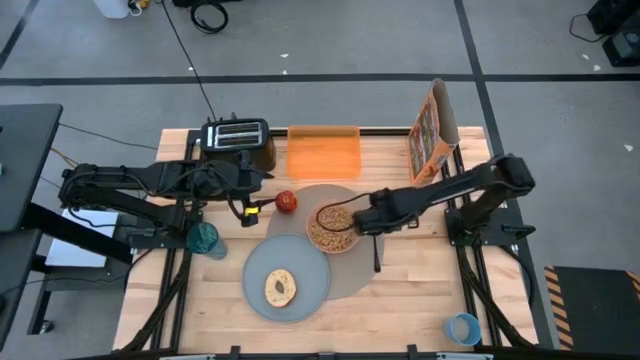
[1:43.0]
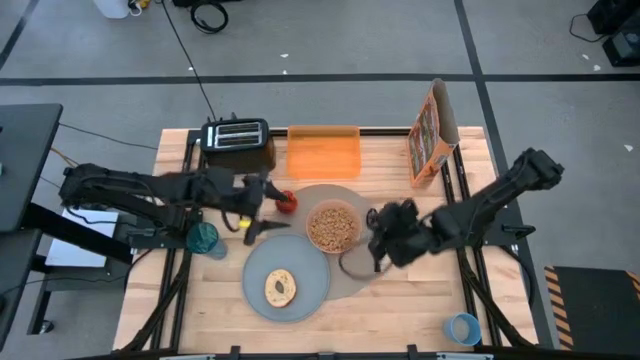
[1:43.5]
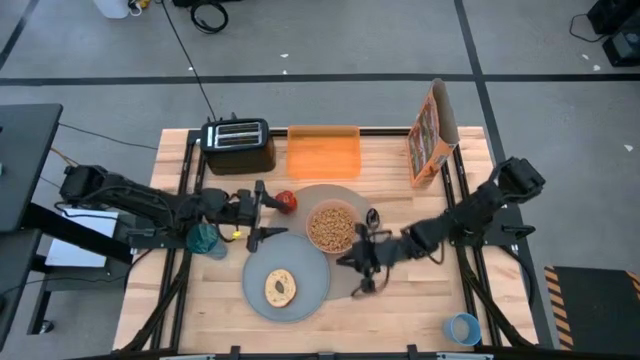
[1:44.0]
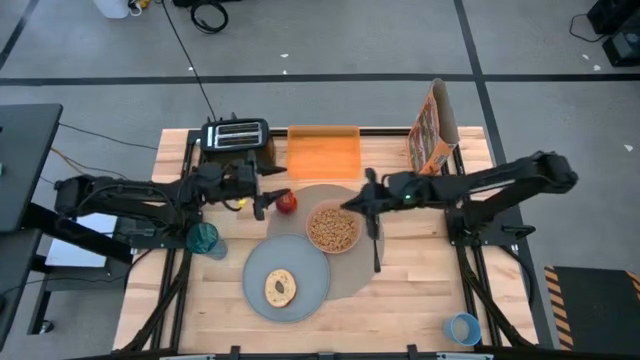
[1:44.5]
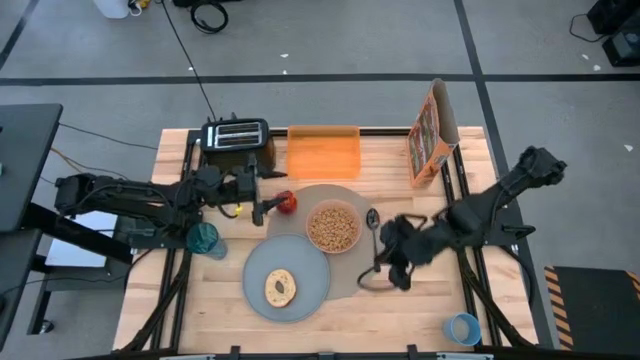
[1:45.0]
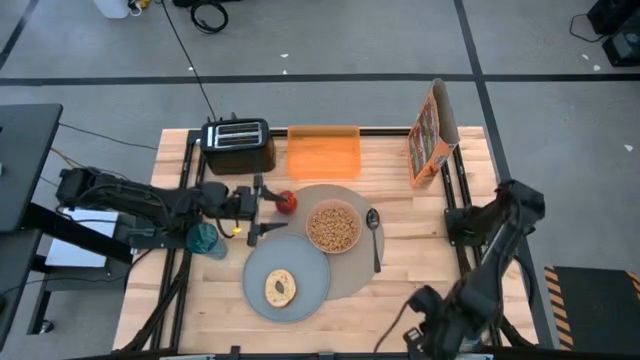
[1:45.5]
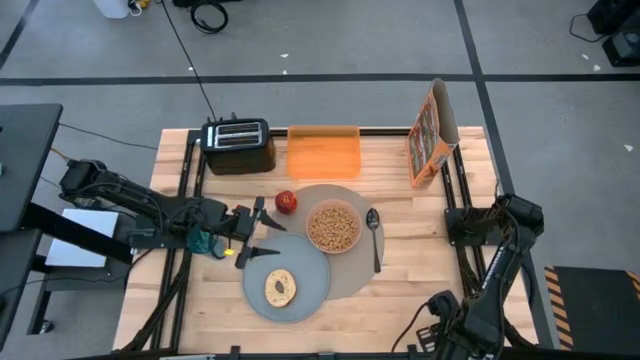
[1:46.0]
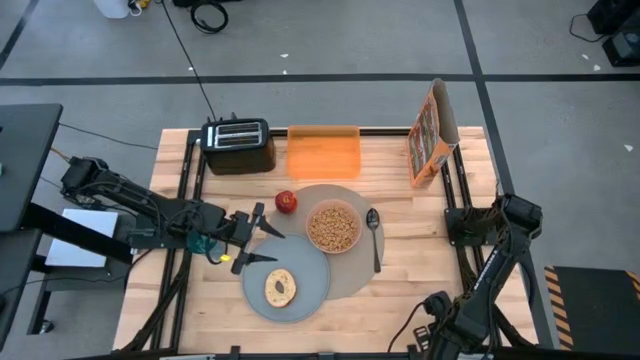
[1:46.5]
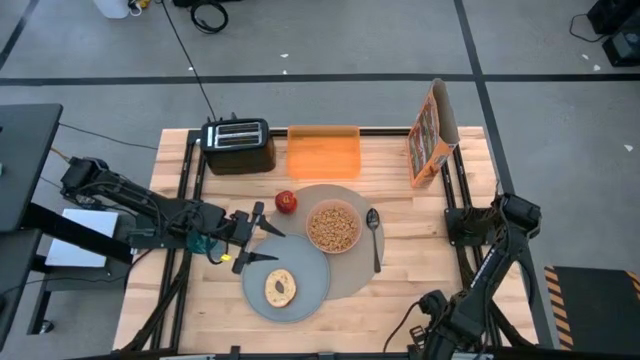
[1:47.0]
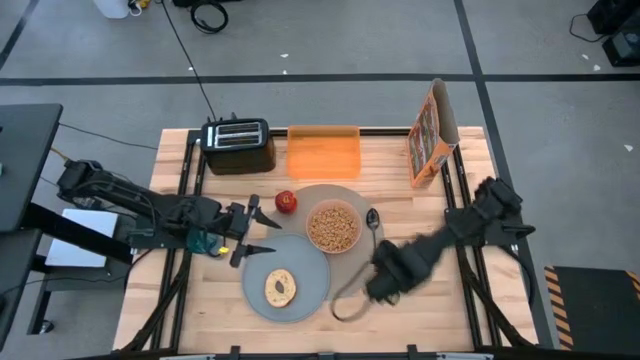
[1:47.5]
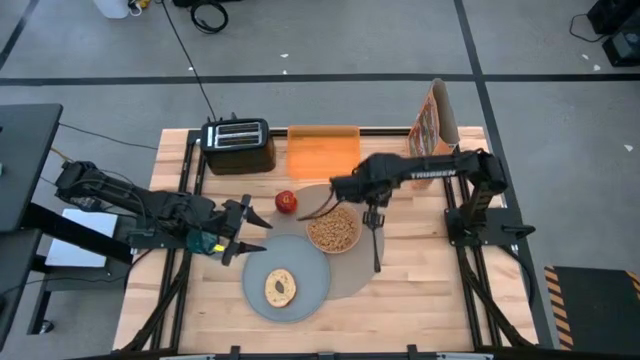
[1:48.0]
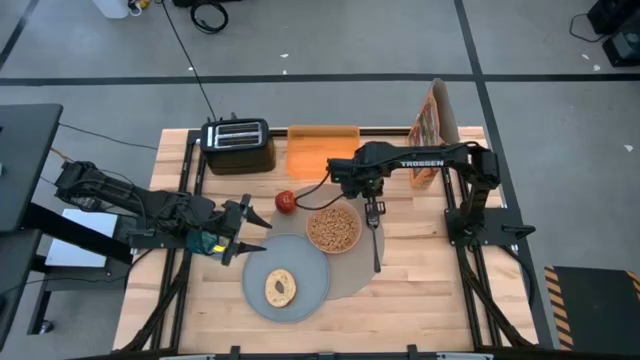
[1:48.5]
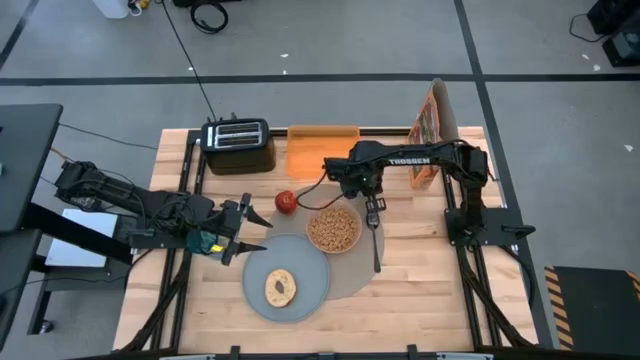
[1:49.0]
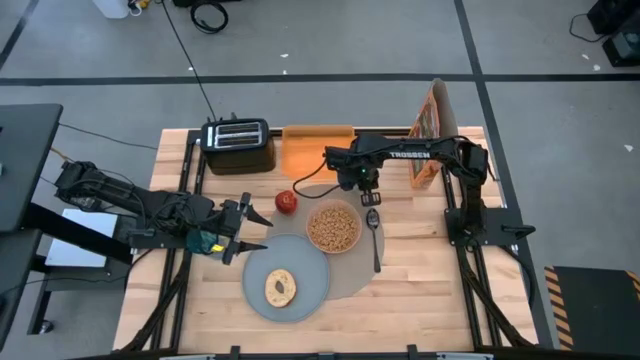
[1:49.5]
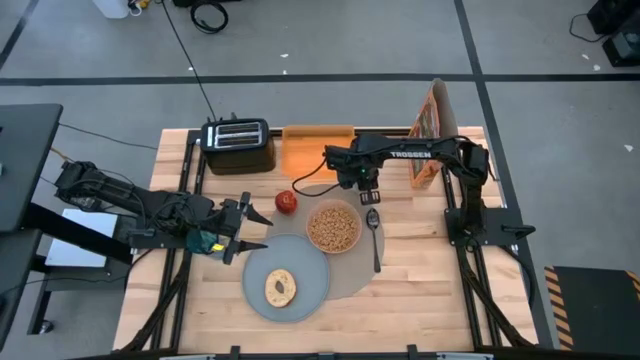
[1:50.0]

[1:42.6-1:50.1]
Task: Arrange a breakfast setting
Put the blue cup at the top right of the table

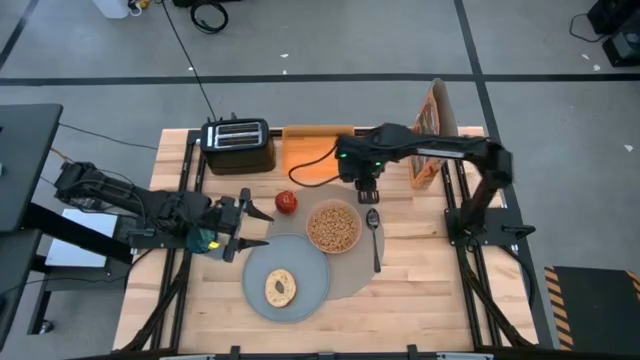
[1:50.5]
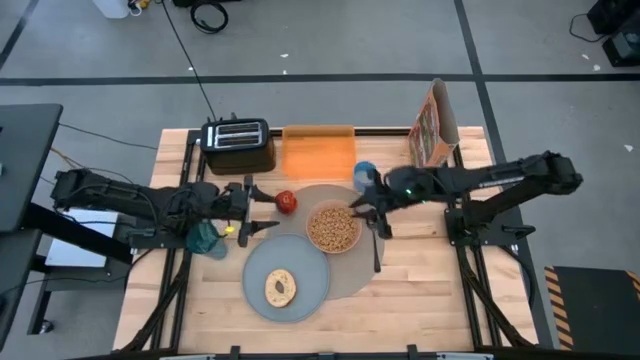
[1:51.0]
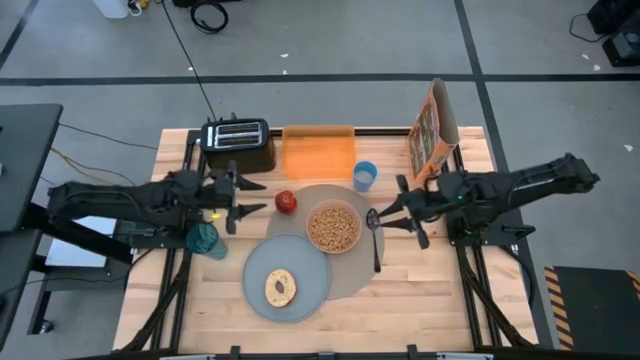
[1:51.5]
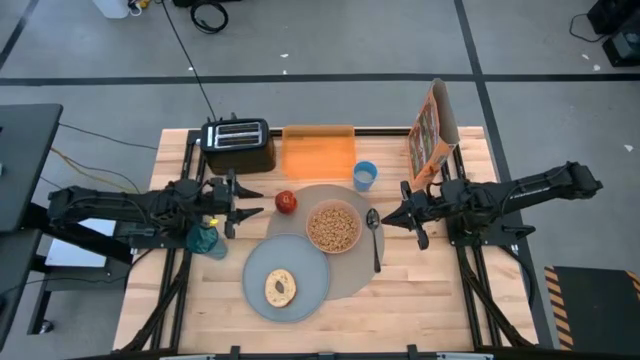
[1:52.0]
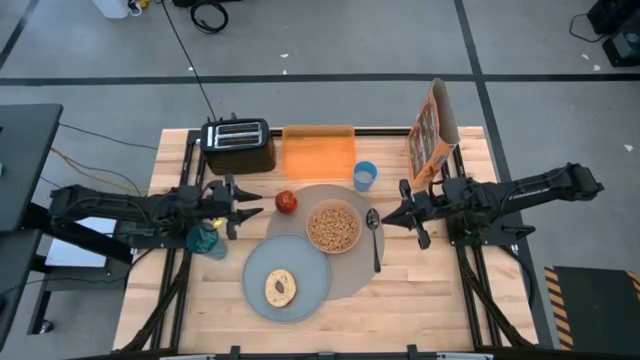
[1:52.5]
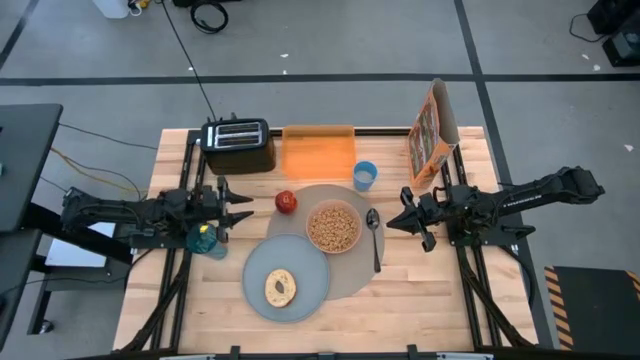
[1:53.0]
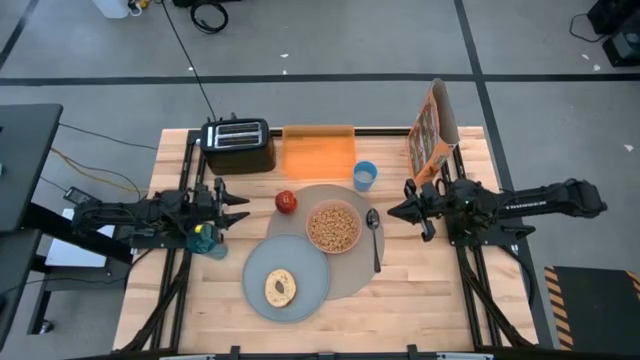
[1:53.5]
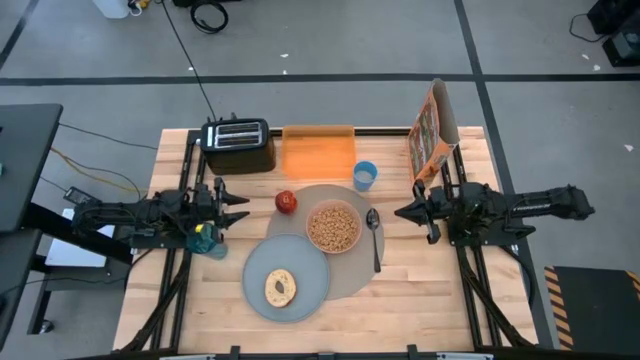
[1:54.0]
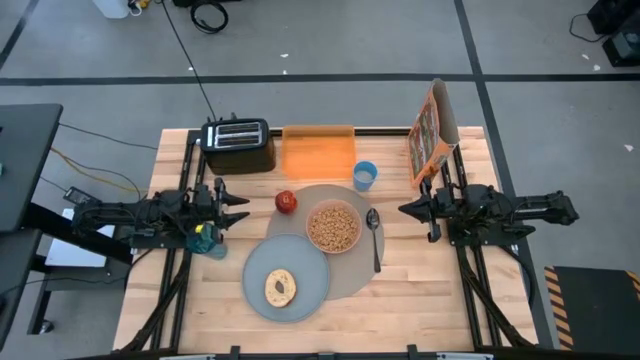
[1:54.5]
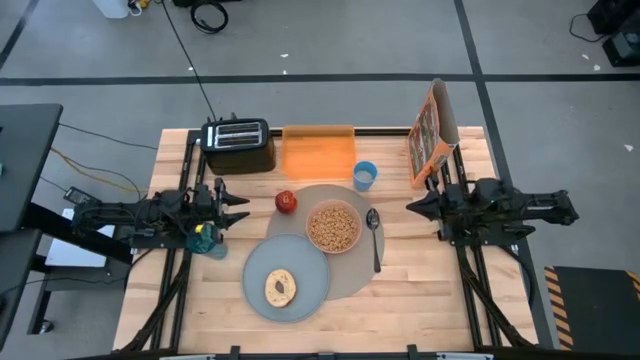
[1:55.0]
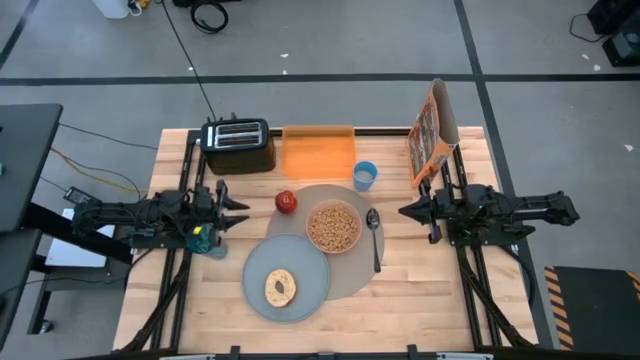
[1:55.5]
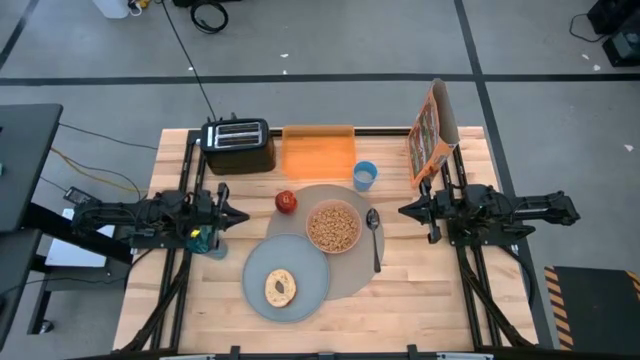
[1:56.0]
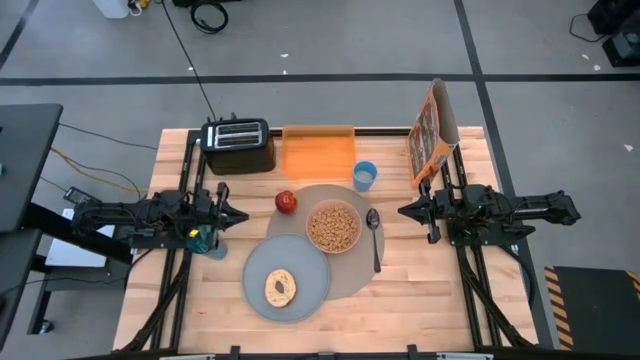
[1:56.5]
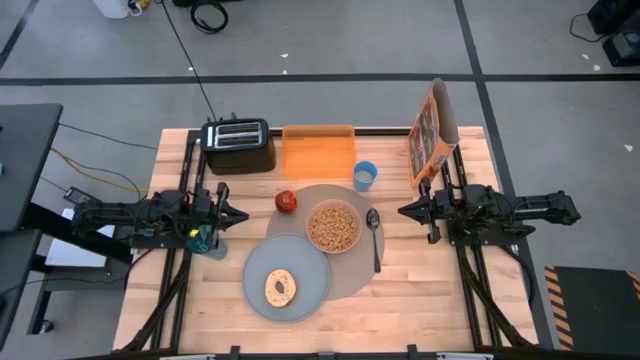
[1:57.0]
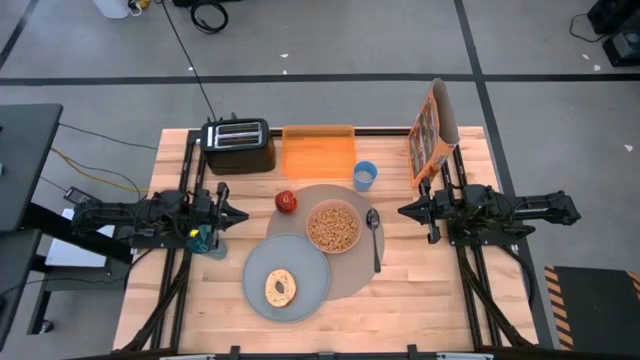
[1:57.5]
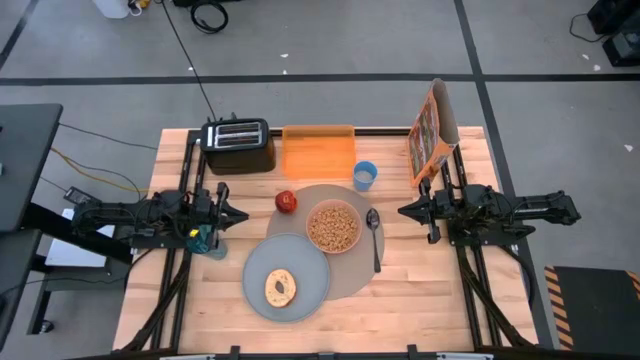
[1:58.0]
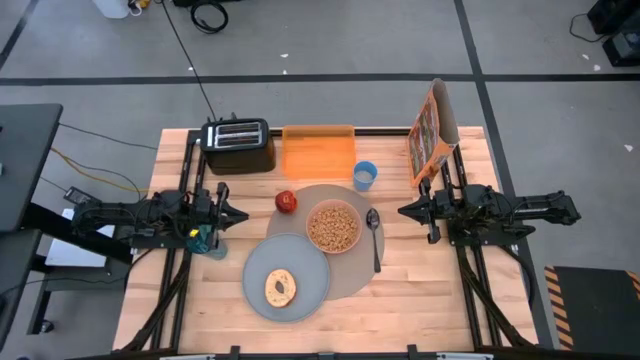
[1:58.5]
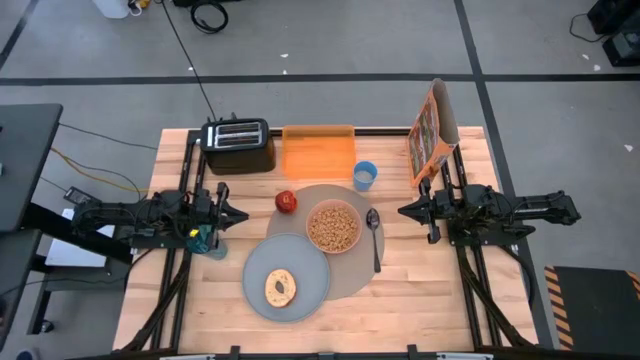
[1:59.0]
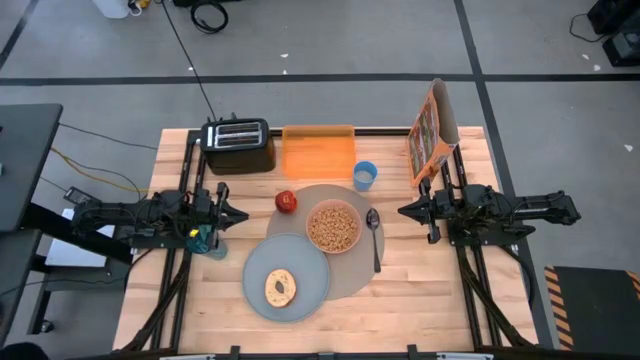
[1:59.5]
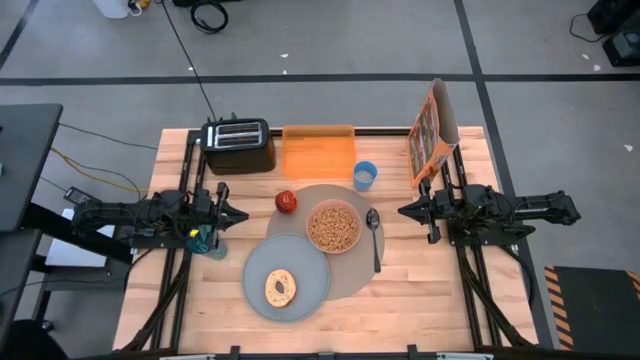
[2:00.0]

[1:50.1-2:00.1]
Return to Home Position

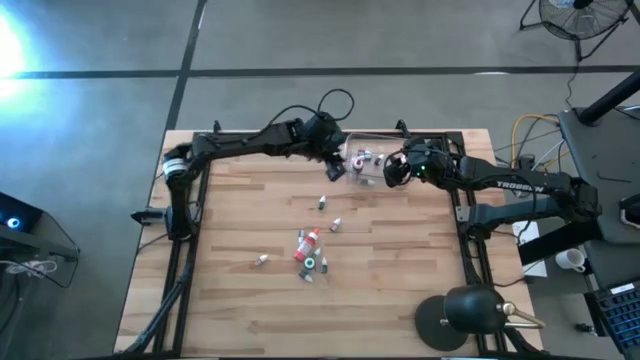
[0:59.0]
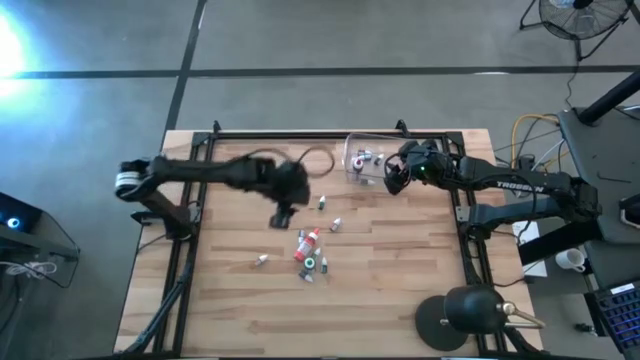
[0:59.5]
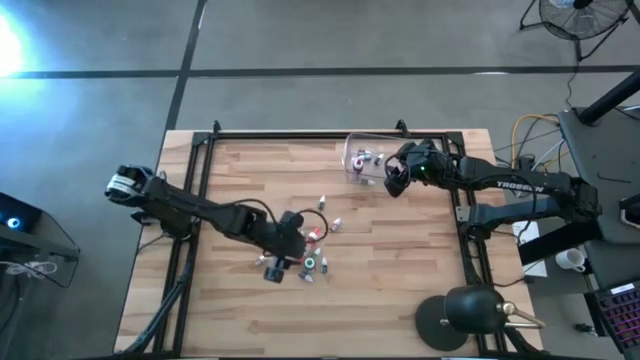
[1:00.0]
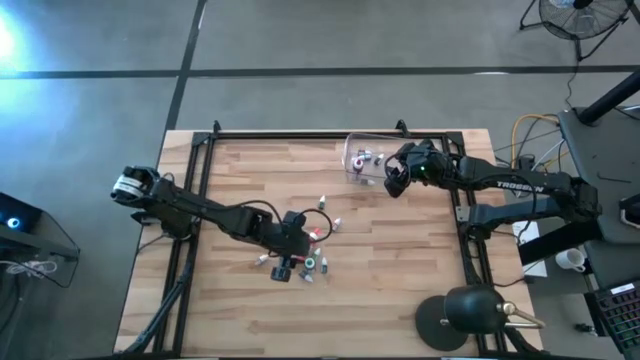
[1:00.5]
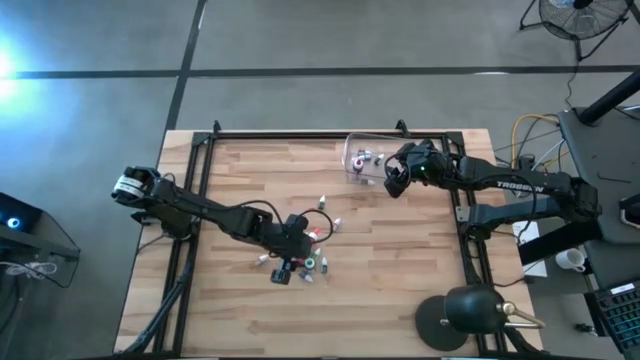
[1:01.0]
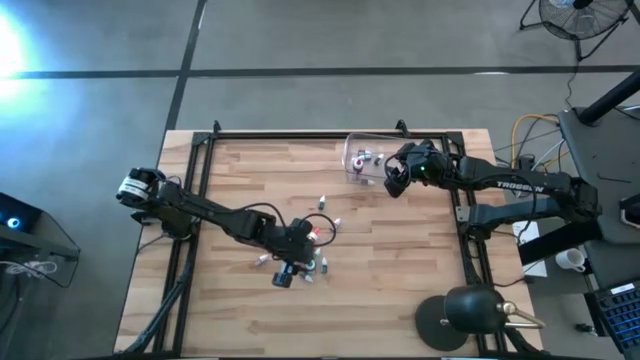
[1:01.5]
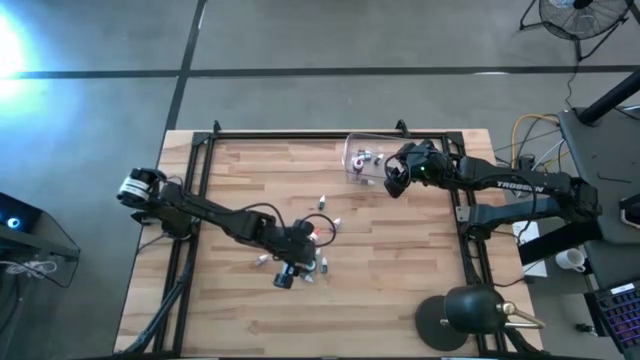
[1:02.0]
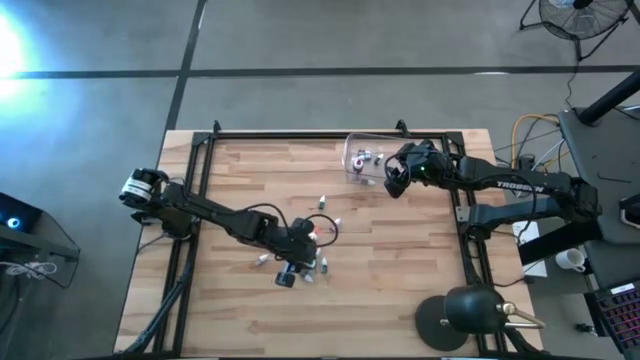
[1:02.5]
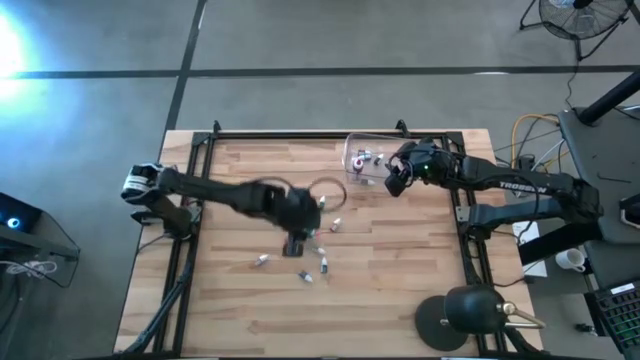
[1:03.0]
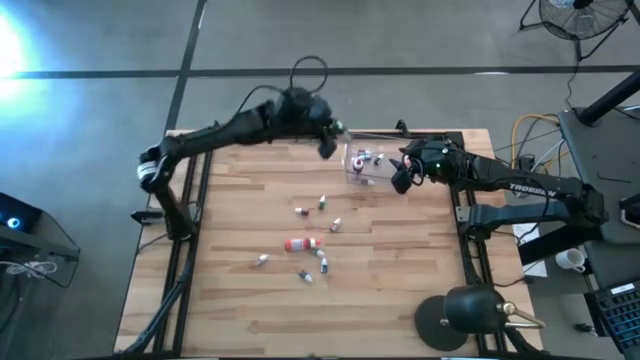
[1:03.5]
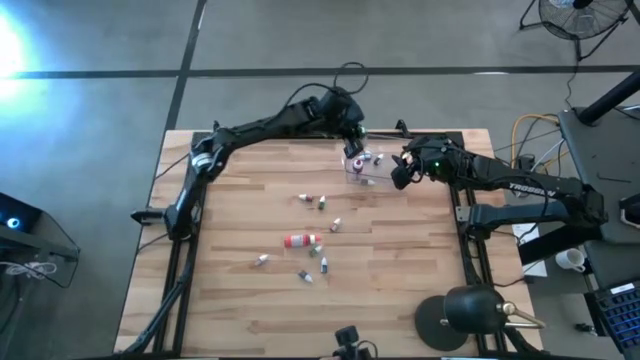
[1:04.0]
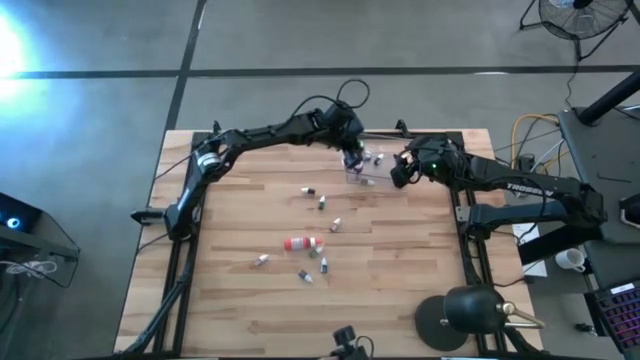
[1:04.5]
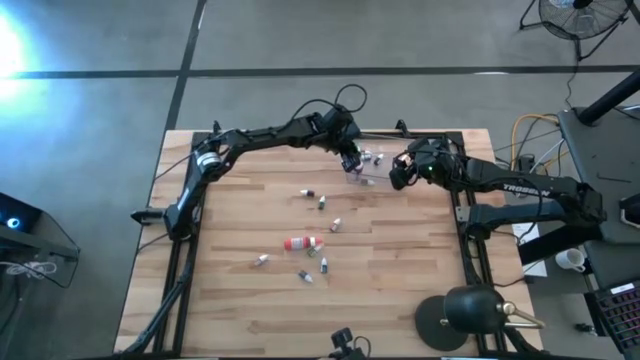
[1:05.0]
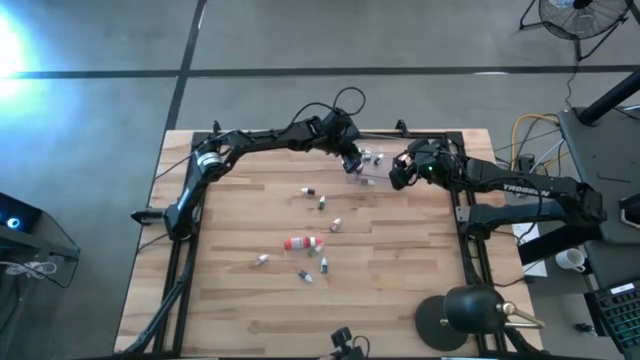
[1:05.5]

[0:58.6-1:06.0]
Task: Pick & Place food coloring
Put the large green food coloring bottle into the transparent bin
